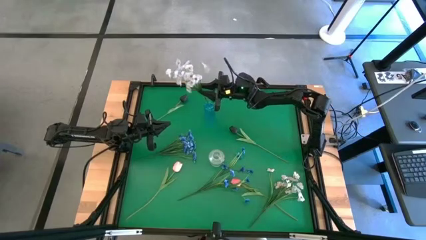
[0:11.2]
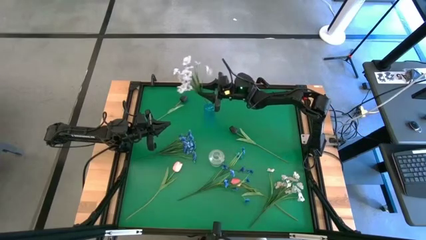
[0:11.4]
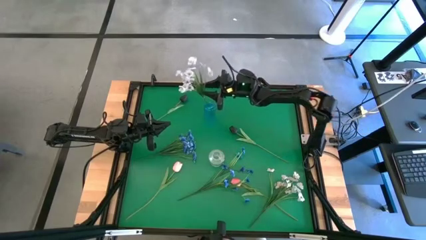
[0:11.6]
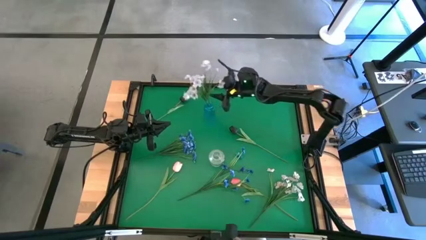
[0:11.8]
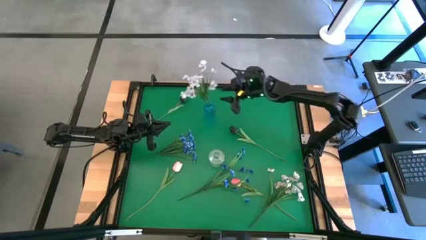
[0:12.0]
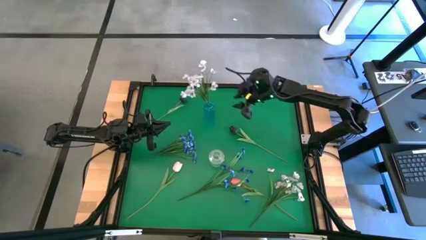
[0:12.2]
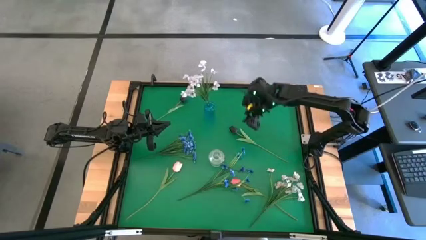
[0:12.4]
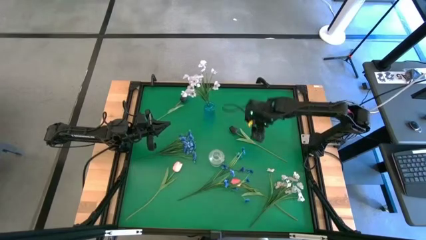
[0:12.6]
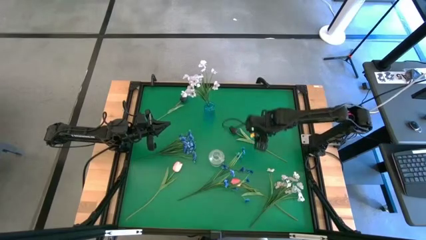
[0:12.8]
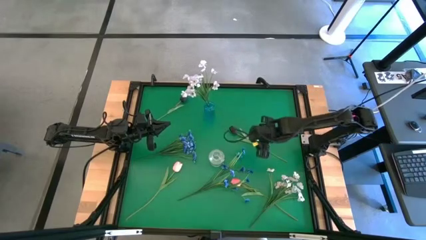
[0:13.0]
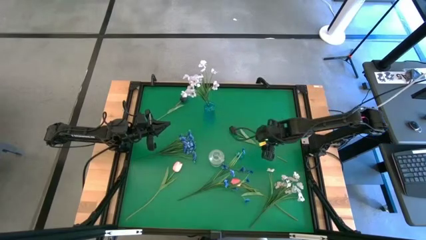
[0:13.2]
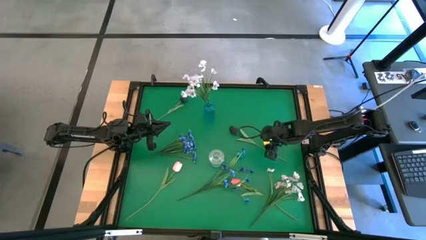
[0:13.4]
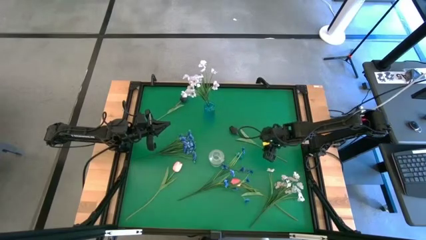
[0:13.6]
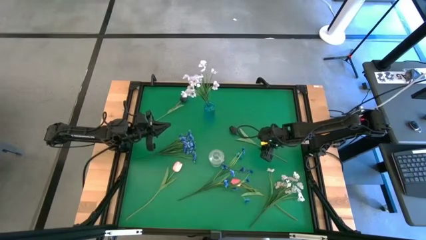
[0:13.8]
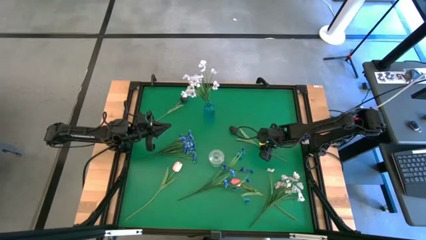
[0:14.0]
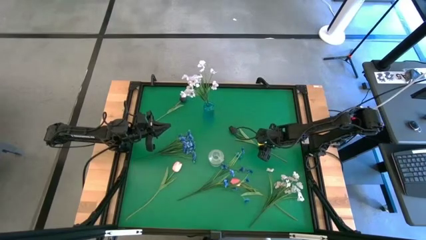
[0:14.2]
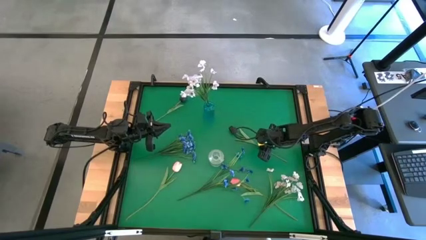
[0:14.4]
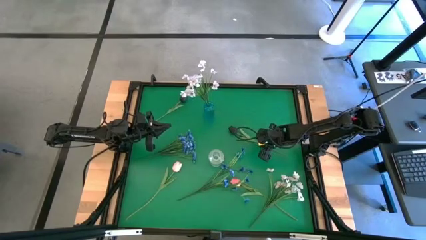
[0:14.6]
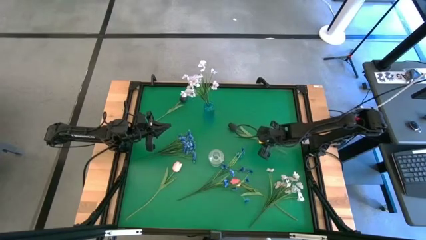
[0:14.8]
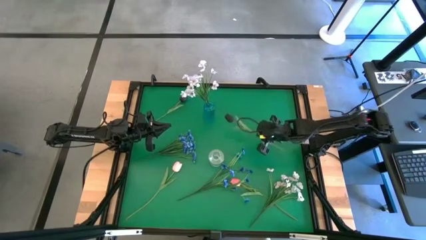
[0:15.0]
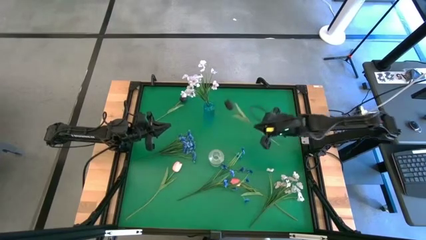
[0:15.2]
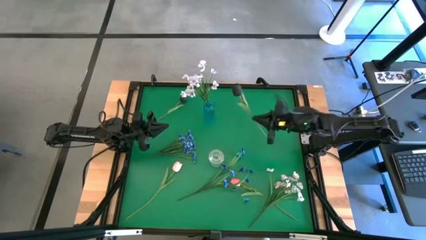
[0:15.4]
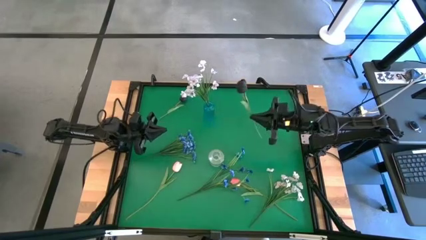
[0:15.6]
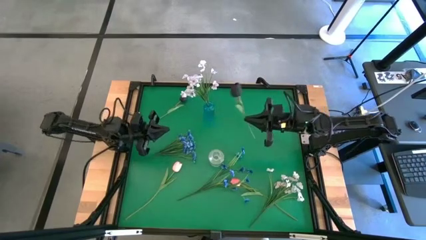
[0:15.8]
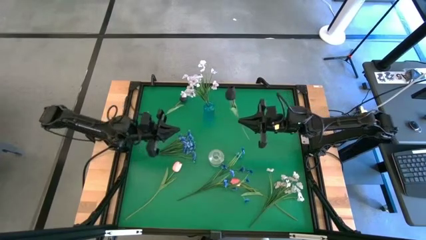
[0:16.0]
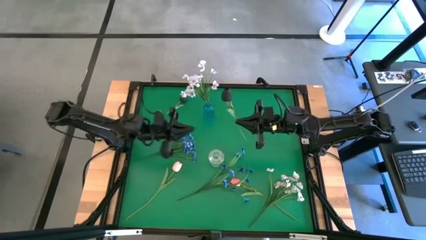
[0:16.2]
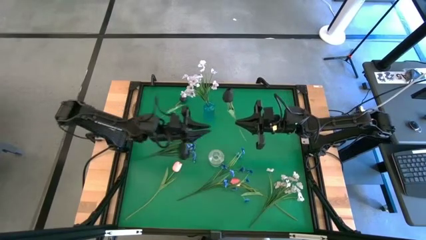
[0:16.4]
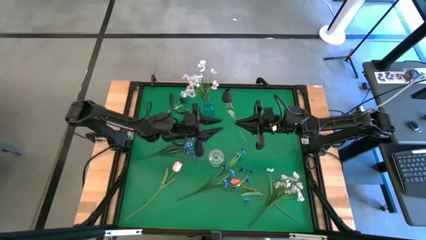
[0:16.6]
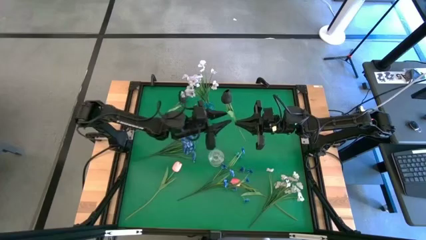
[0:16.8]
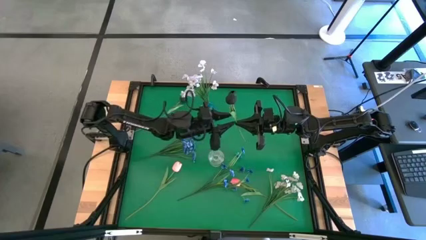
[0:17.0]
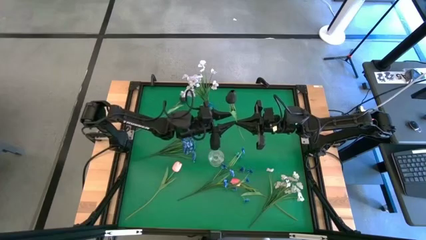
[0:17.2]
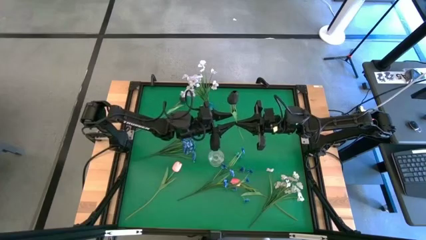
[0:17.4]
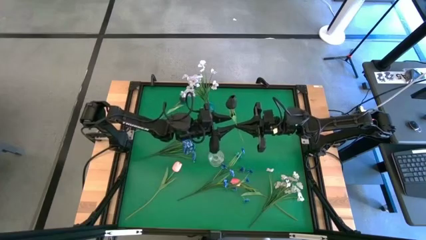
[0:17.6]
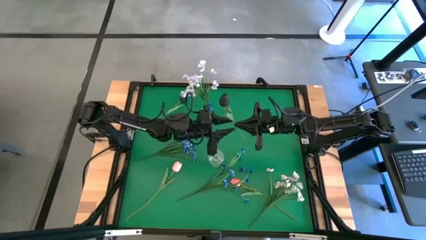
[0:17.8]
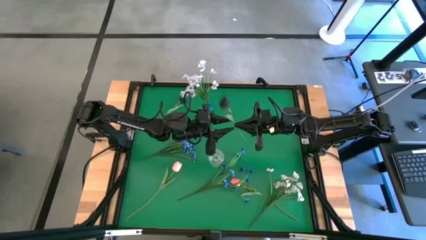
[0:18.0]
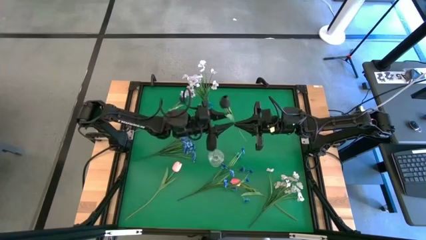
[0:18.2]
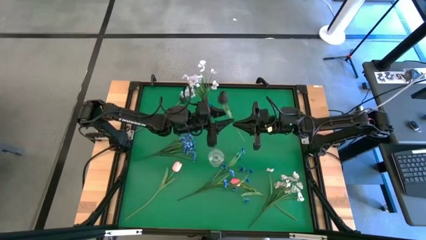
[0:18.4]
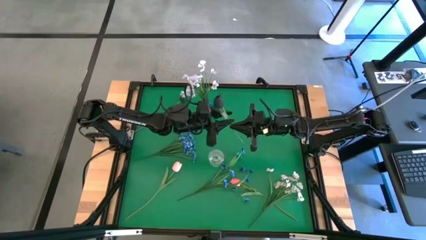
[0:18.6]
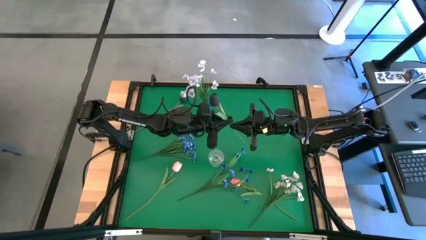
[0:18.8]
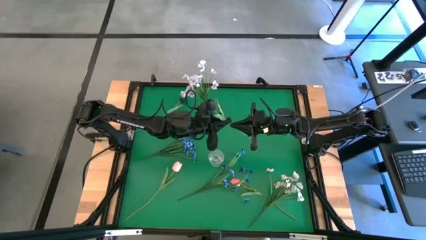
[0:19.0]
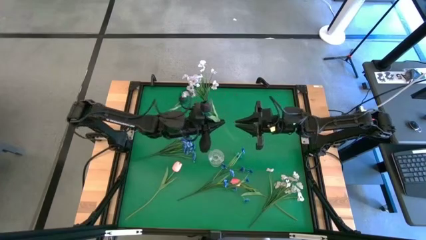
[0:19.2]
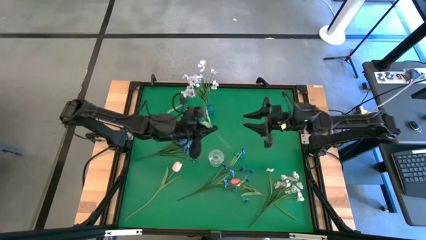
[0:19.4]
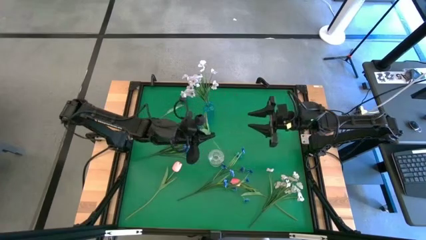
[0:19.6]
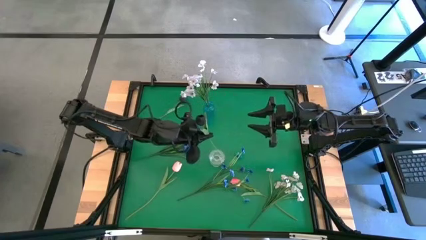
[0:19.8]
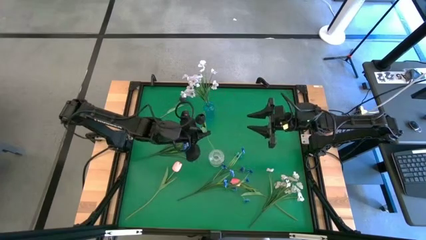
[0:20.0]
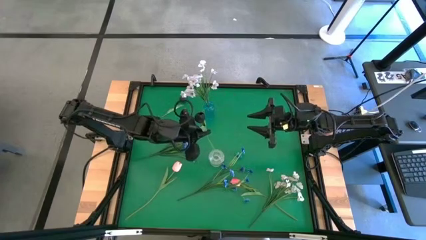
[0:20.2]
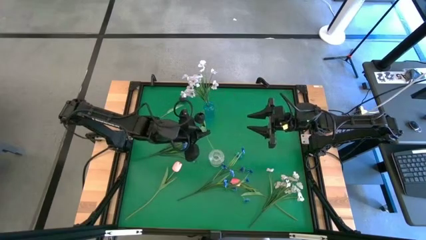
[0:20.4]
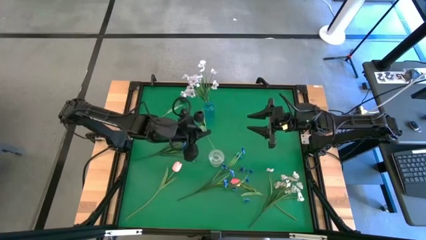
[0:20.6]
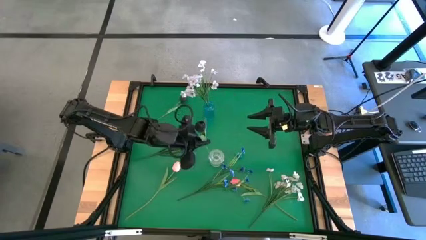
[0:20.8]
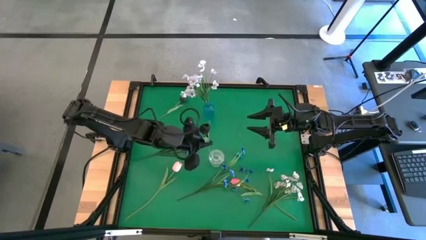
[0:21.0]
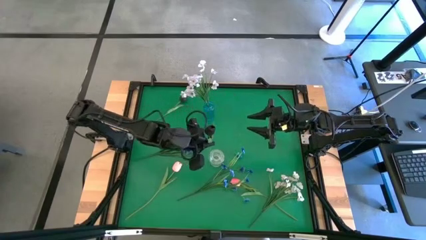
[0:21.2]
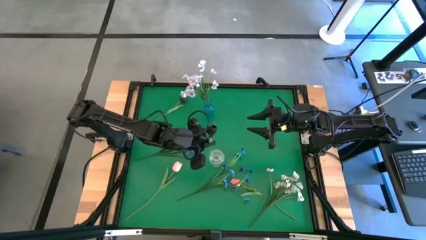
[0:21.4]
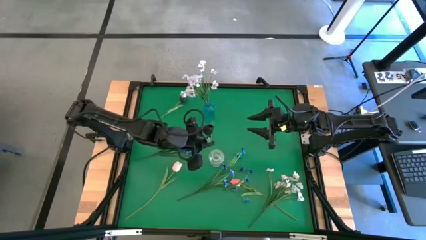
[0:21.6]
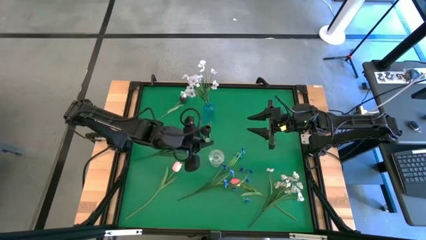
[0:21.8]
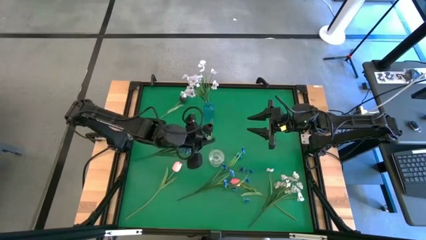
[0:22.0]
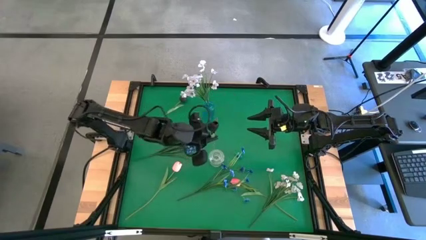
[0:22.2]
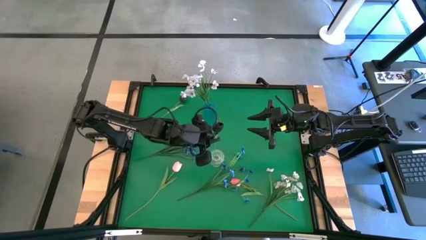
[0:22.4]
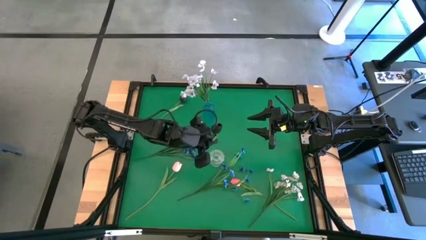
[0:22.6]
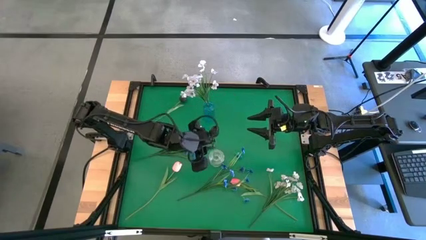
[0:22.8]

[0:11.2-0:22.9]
Task: Sort flowers into vase by color
Put the right black tulip into the transparent vase

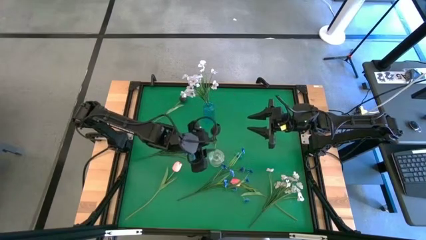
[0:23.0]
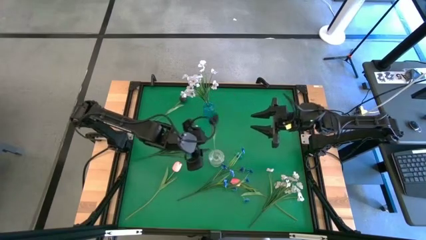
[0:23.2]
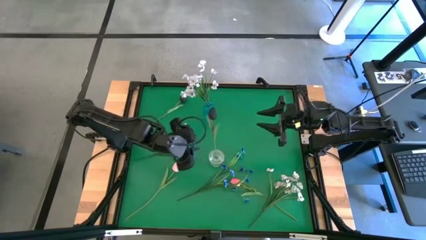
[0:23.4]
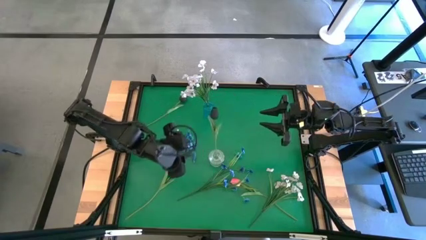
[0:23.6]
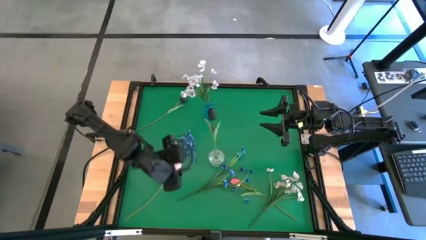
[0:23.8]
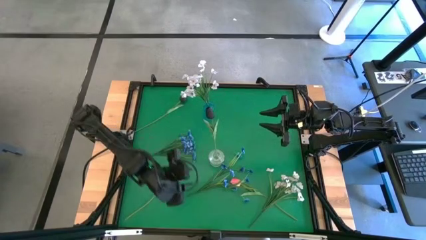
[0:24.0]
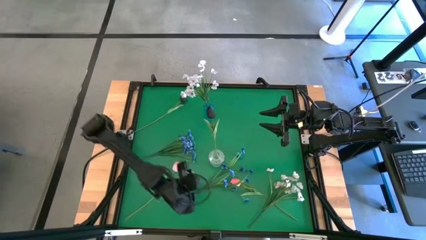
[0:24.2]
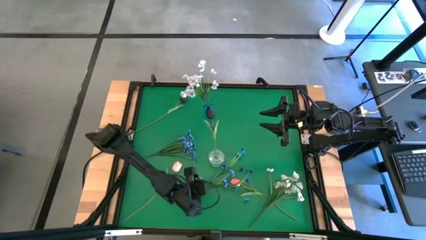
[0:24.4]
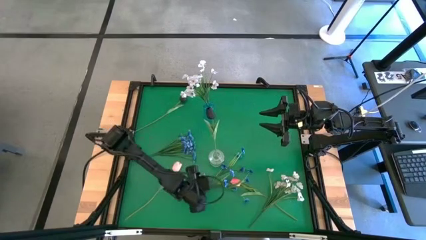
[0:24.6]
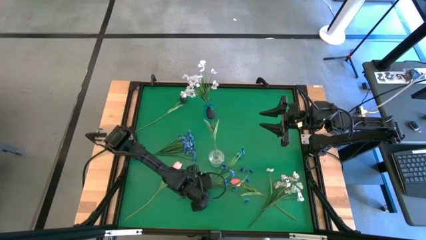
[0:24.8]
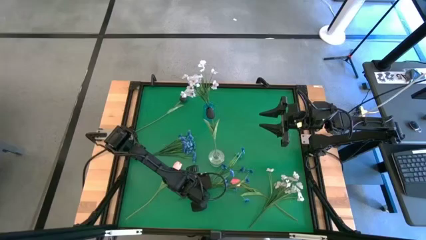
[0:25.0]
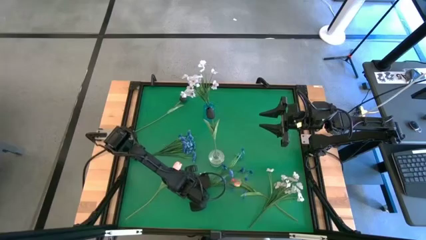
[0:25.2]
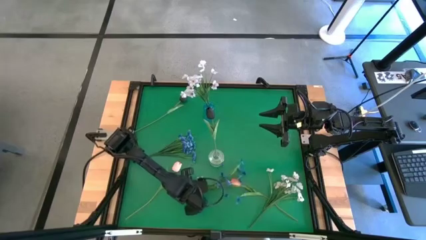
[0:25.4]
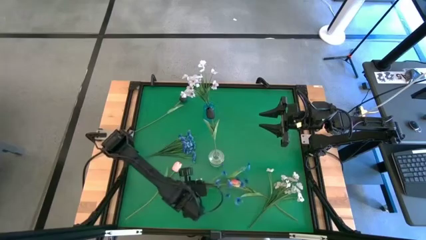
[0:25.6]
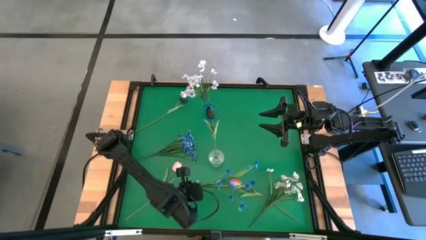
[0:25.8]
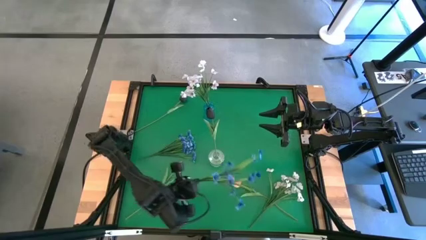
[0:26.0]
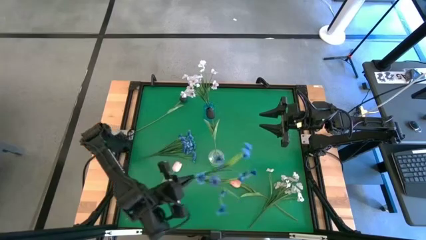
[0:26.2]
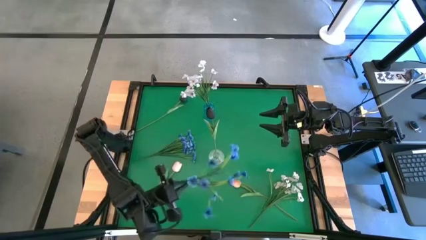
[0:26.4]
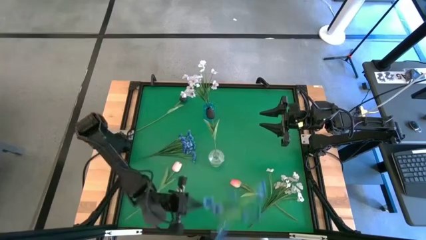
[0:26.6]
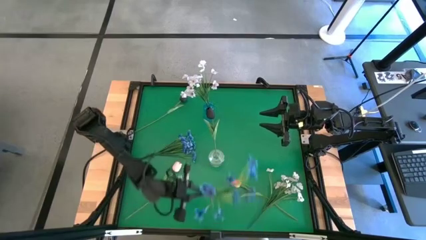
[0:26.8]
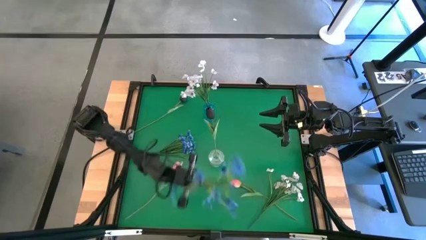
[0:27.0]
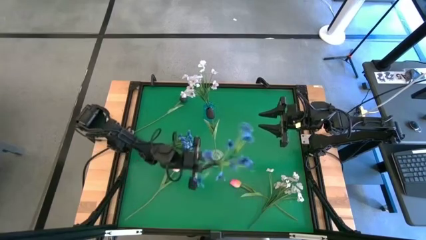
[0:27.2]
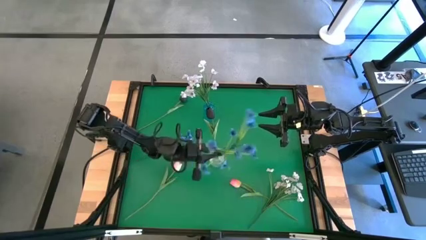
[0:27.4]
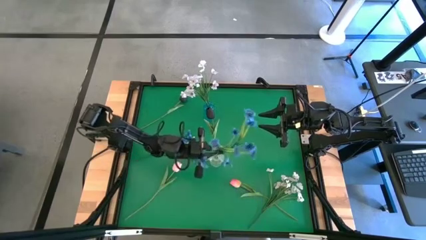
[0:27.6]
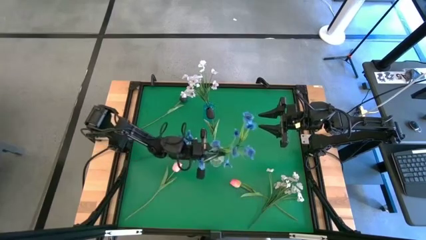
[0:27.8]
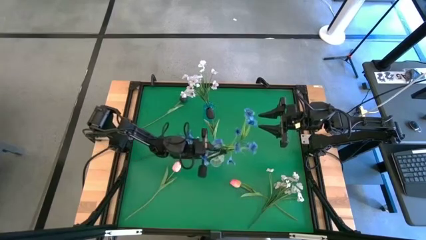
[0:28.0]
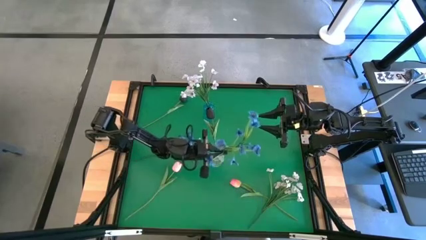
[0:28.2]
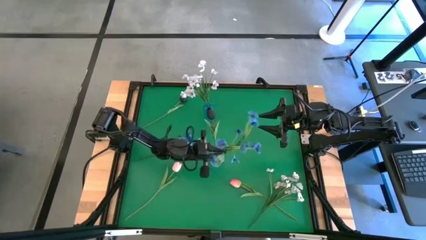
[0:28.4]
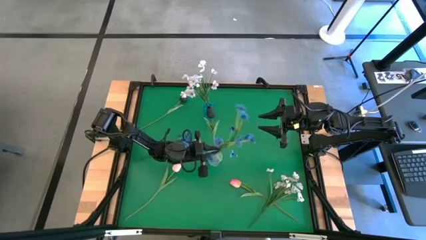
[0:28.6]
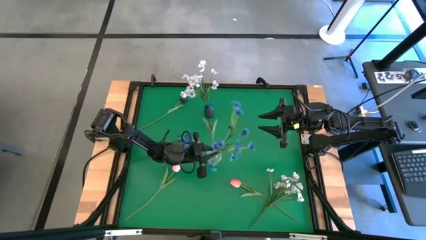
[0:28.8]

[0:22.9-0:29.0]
Put the bottom blue flowers into the transparent vase
